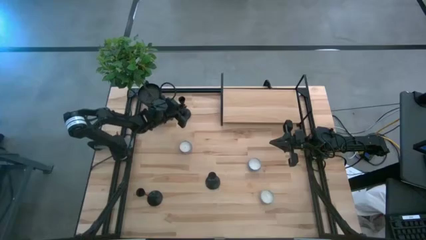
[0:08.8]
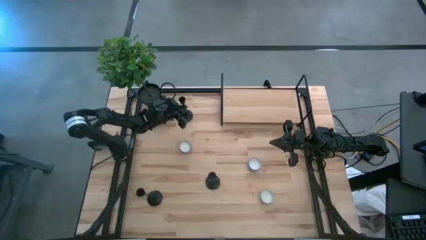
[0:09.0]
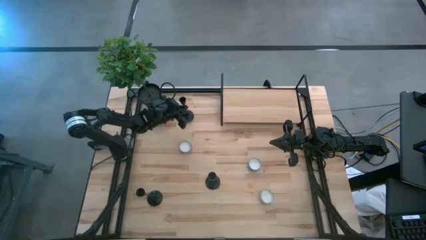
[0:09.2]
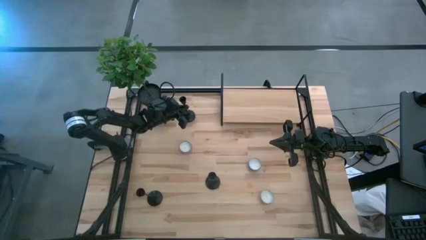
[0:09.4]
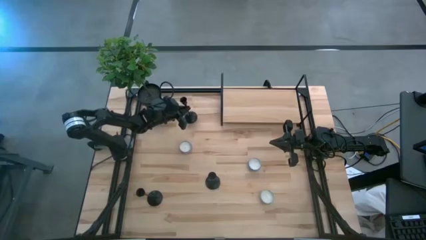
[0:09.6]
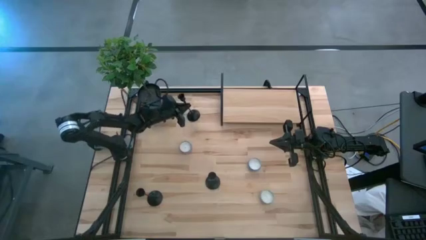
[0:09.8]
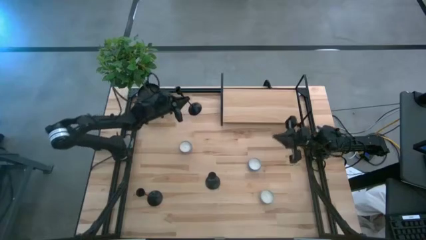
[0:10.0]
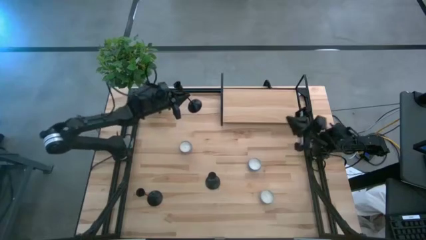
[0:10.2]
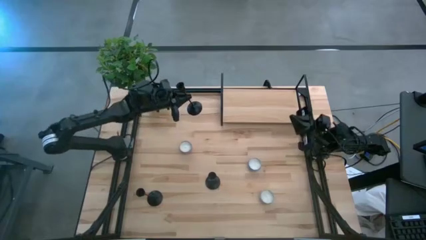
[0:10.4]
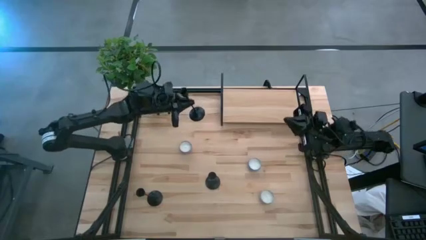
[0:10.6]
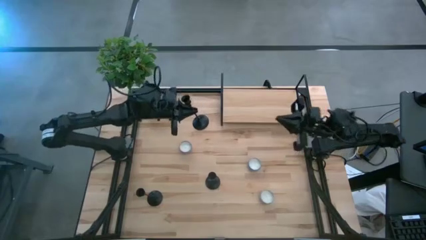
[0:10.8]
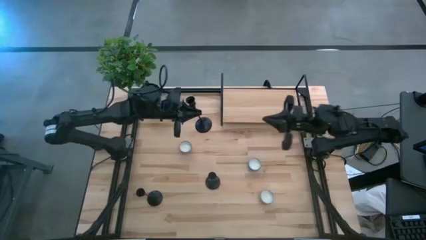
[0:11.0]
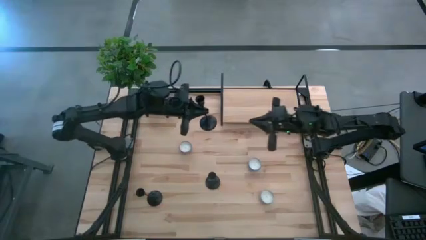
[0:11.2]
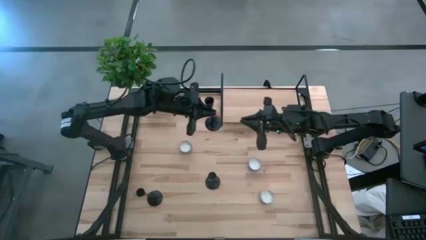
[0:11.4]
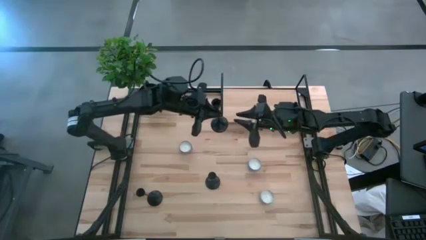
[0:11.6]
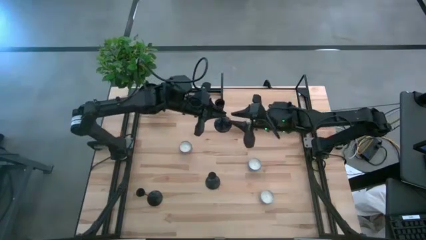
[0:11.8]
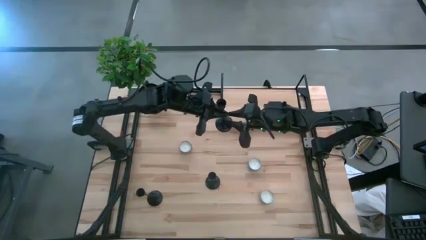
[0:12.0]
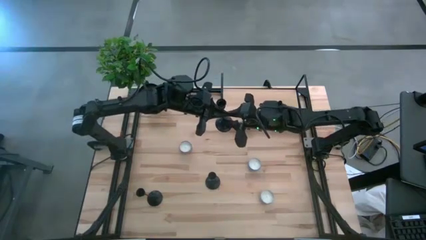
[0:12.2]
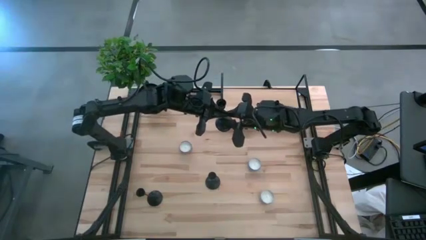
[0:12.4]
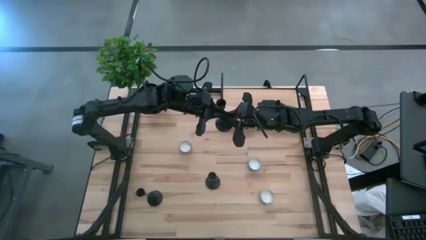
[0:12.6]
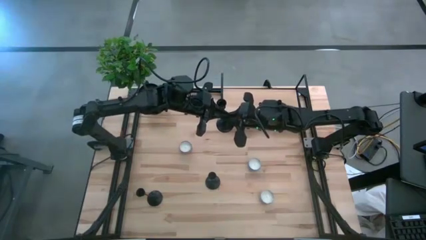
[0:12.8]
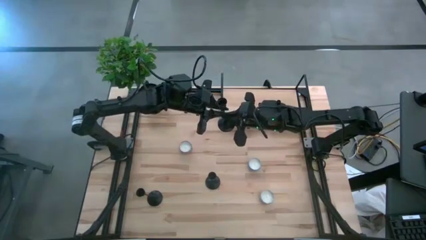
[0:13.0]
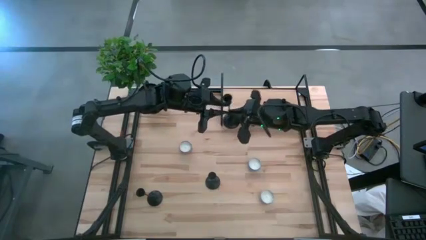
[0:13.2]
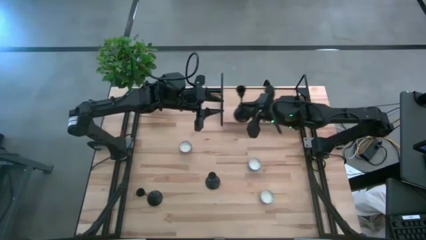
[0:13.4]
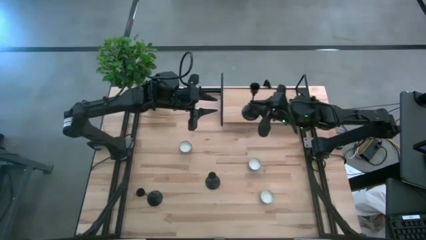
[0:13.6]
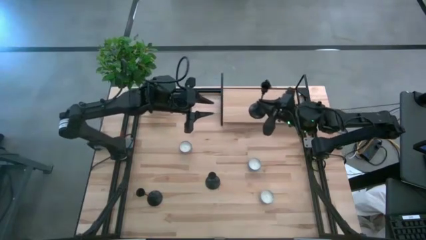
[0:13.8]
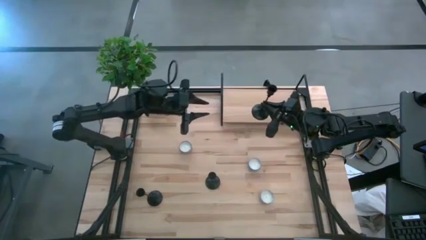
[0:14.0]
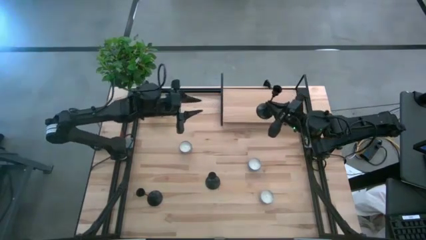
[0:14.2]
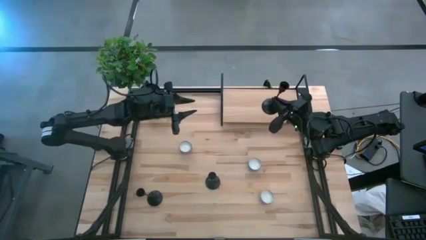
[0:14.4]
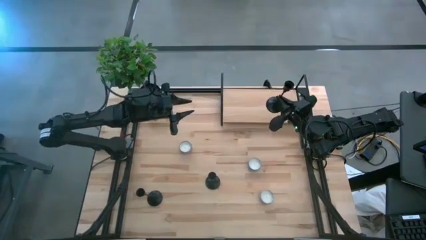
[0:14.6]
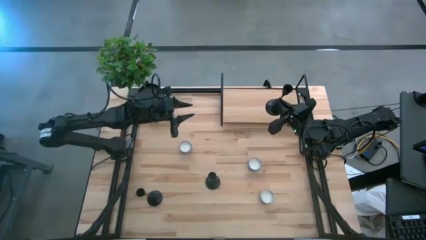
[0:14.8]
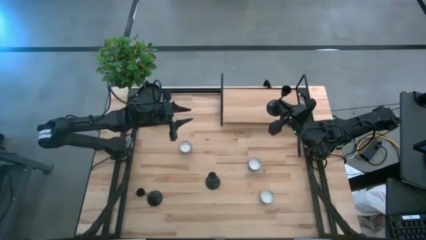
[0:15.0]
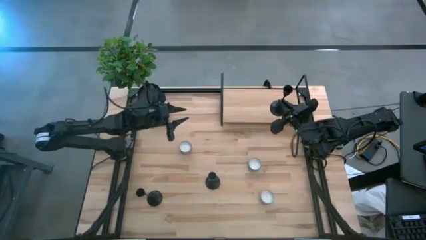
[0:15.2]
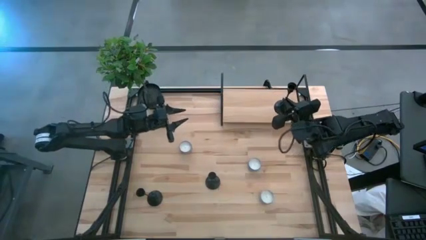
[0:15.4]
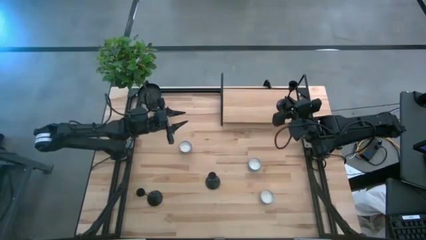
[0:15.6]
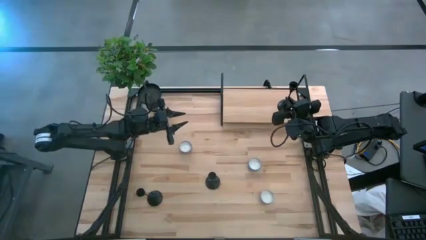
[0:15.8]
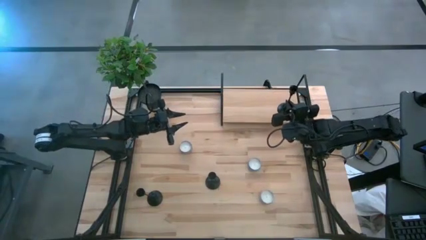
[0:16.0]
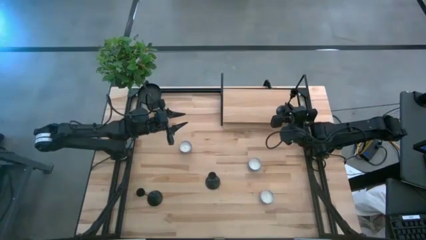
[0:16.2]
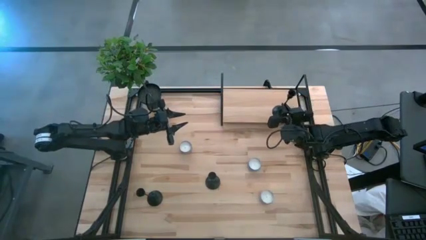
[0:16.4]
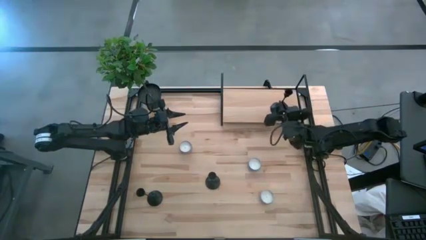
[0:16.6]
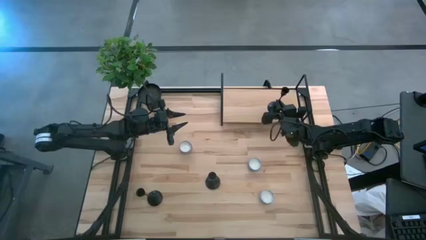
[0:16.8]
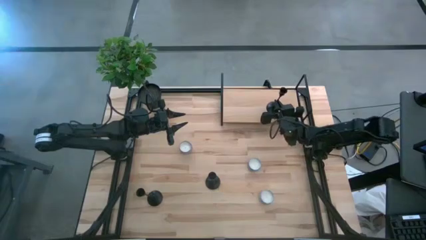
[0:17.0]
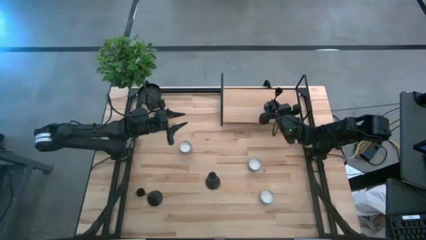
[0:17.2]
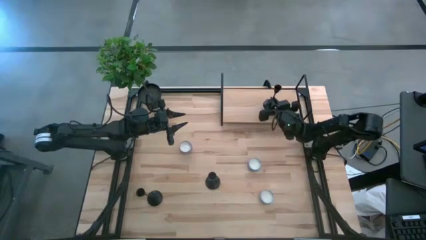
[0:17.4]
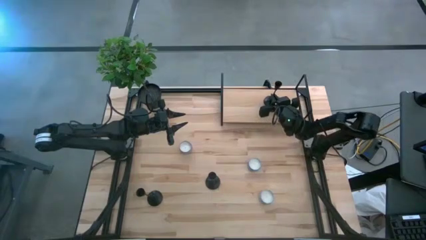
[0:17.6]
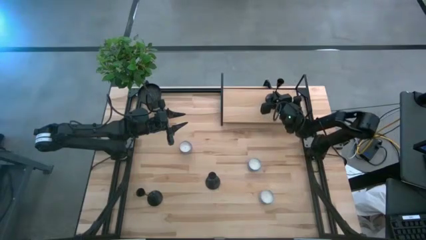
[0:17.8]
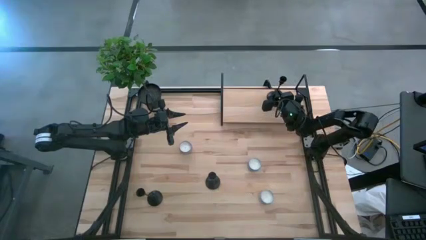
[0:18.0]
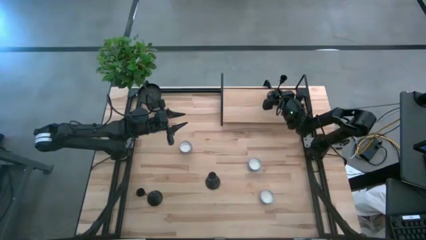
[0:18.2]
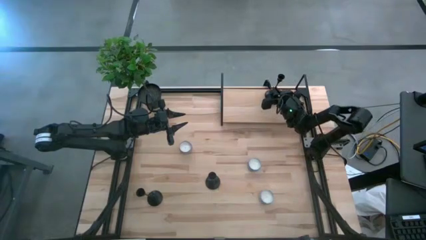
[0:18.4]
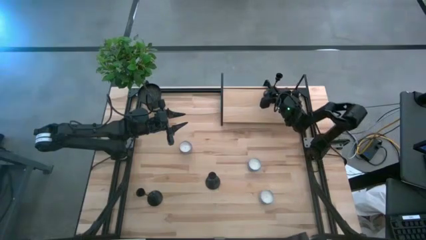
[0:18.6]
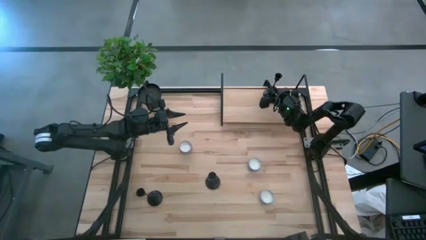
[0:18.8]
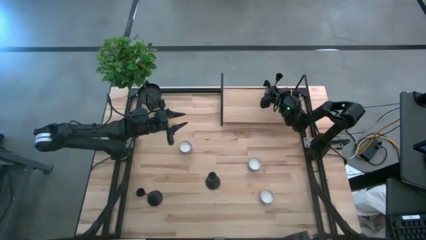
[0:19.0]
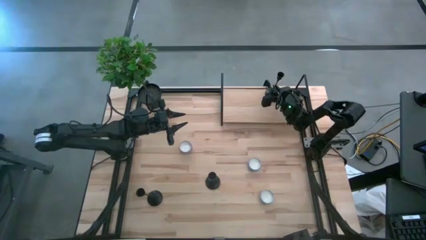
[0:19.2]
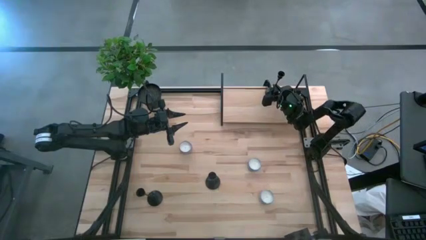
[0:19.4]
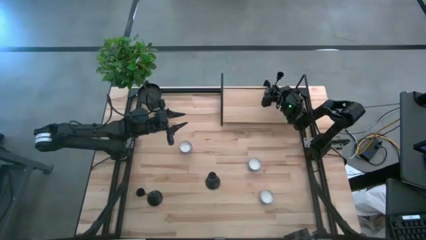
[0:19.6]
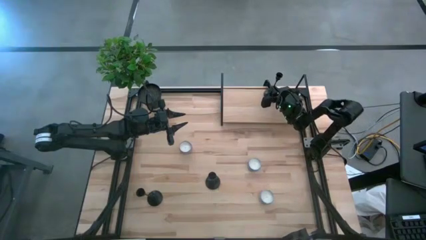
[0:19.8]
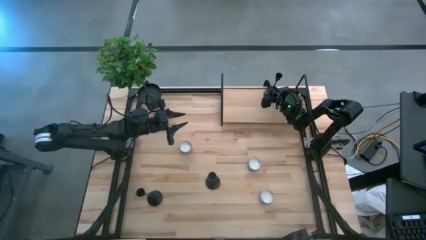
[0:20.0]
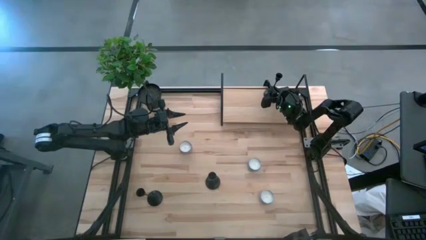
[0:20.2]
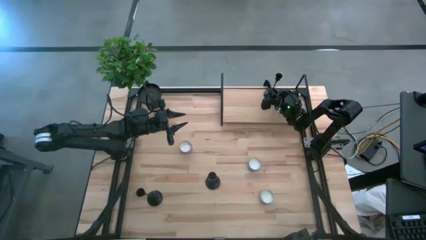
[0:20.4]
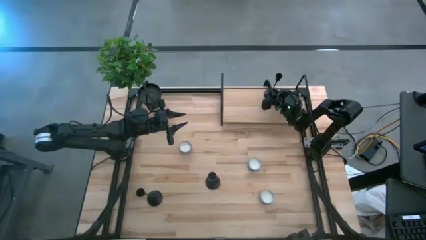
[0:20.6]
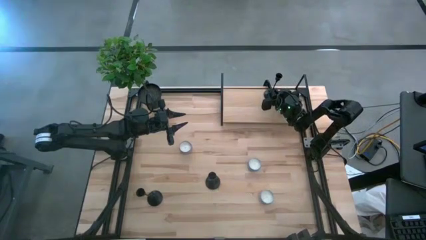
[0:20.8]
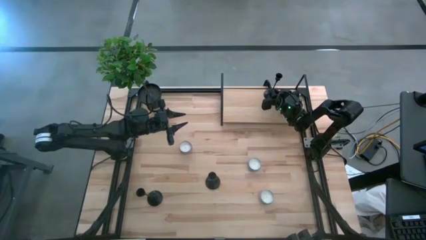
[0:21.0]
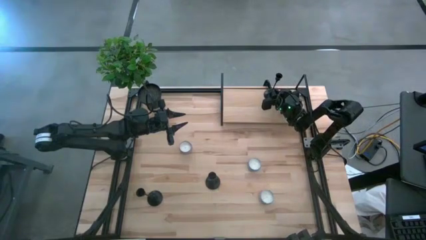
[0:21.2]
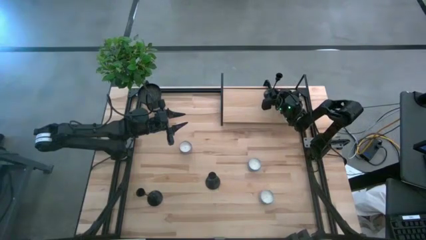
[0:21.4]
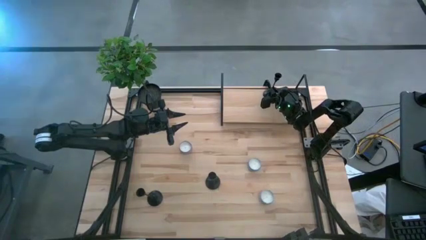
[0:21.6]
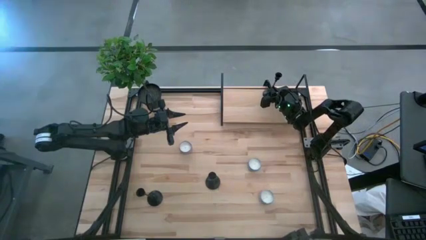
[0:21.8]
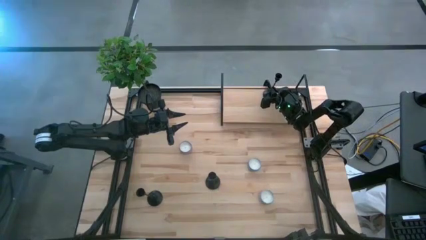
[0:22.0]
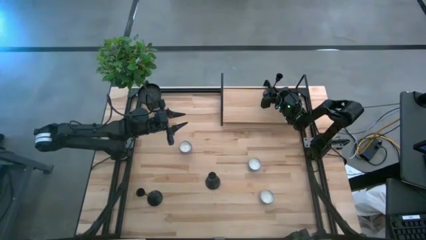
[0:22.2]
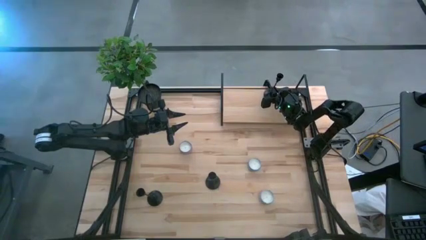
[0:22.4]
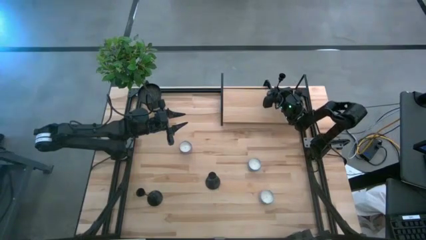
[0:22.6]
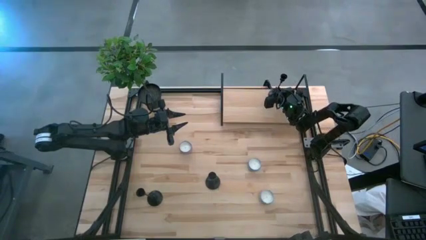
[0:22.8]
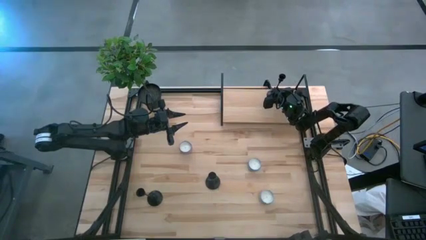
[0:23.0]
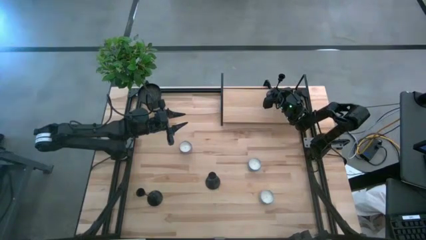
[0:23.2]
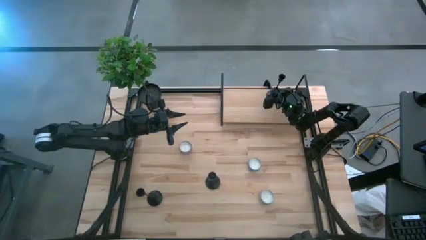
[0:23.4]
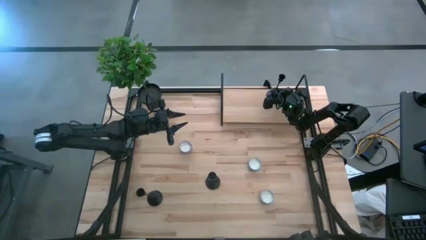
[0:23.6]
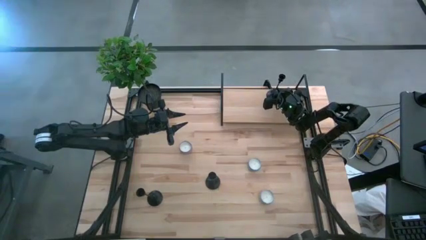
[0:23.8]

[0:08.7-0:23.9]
Task: Pick & Place candle stick holders
Put the top black candle holder on the shelf
